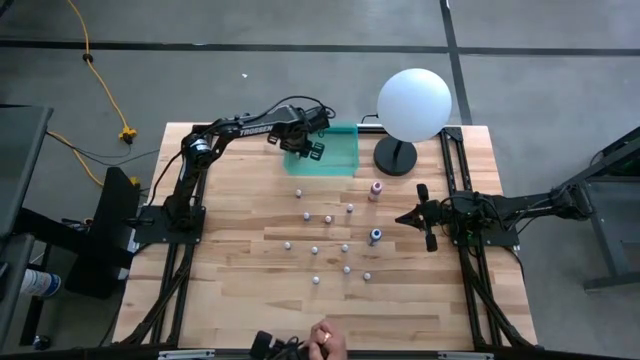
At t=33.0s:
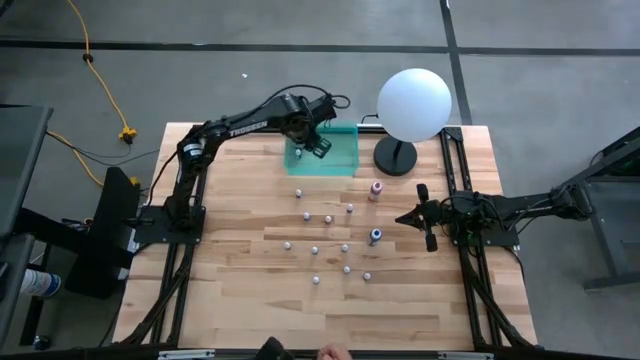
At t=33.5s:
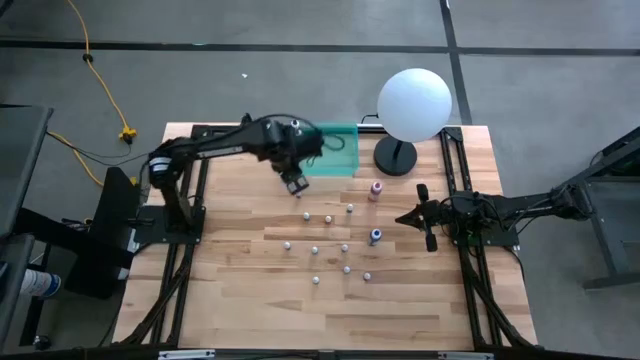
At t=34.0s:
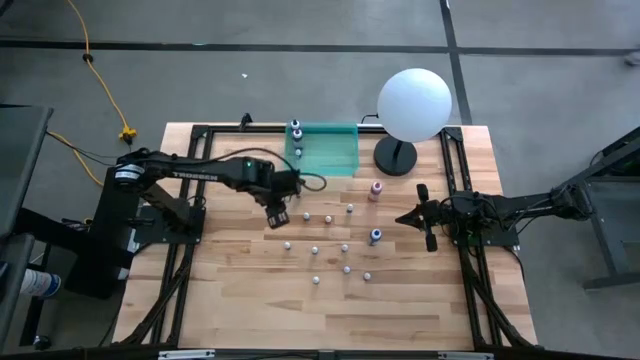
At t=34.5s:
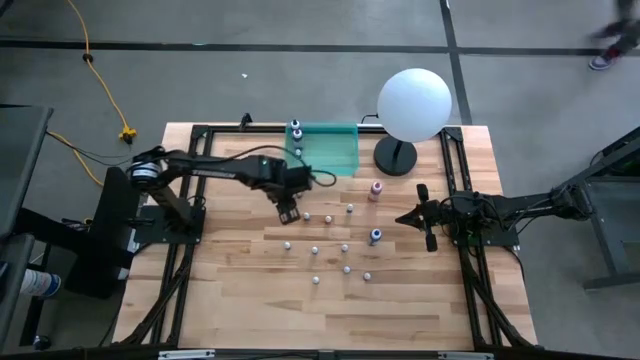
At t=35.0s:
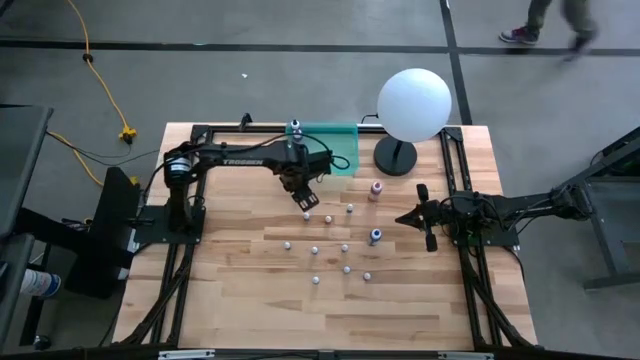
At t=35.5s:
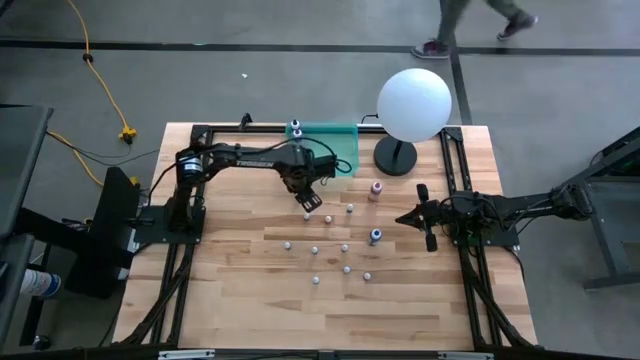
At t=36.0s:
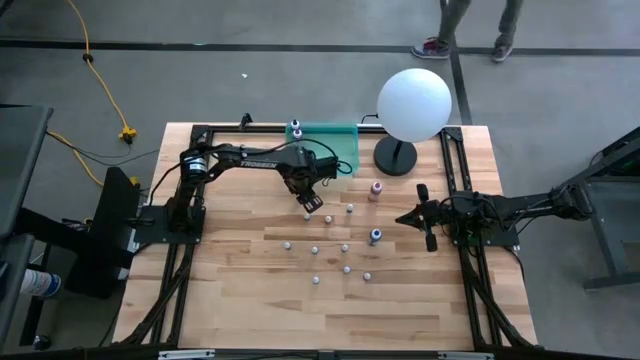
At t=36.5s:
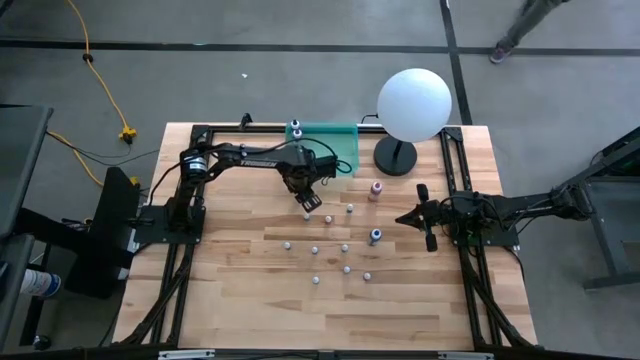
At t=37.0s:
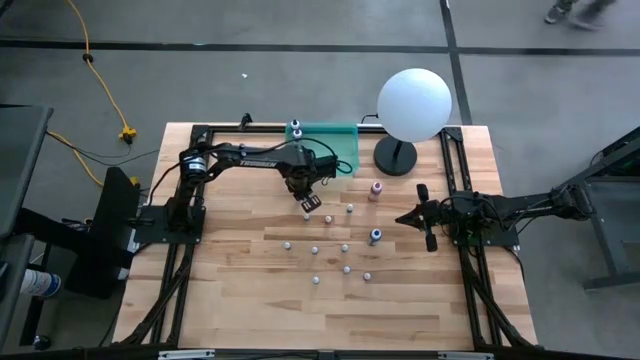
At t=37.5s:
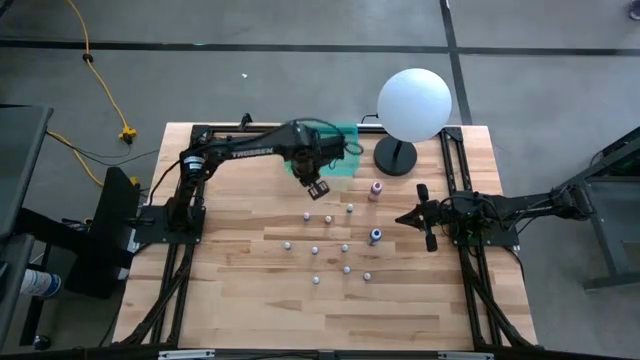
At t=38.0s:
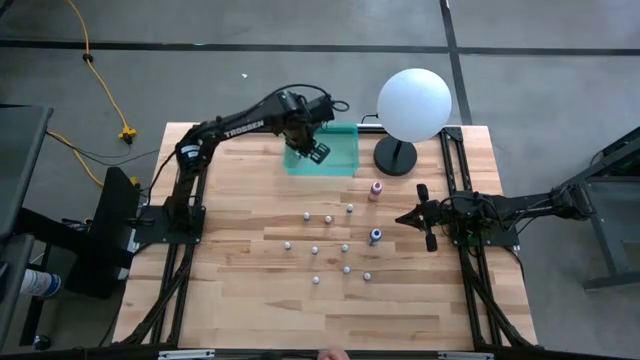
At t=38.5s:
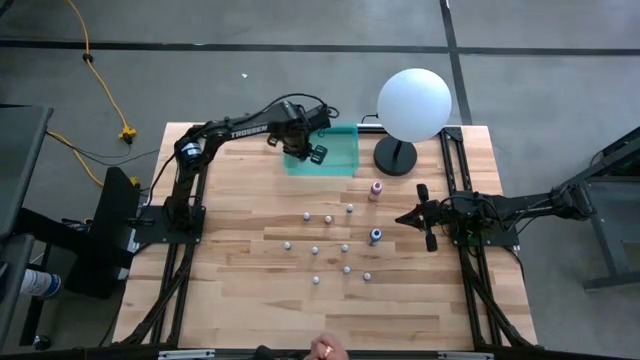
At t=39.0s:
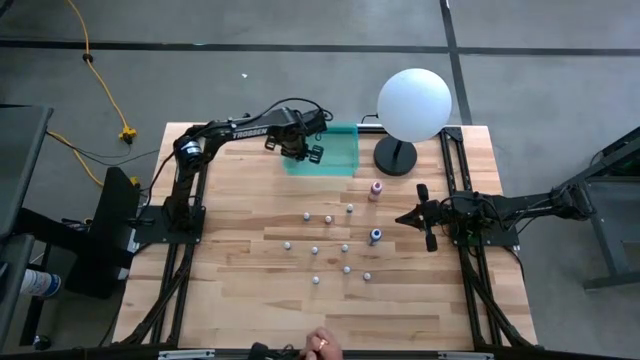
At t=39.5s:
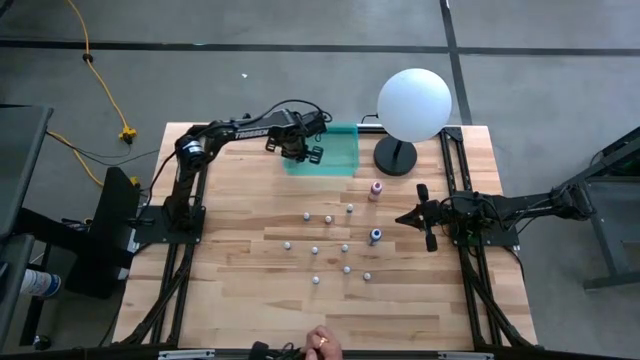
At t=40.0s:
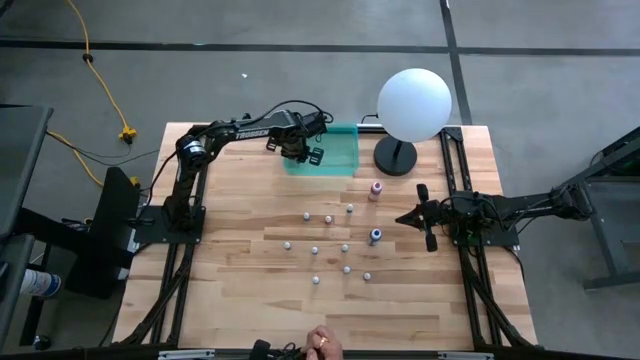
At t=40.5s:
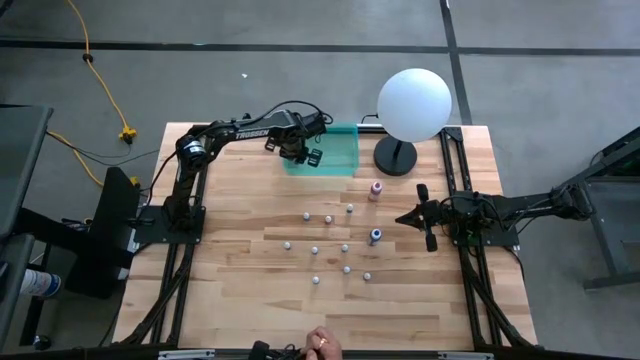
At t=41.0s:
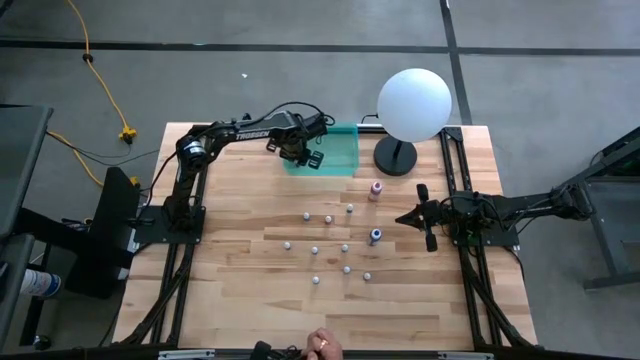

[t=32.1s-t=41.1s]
Task: Pick & Place food coloring
Put the small black food coloring bottle into the bin

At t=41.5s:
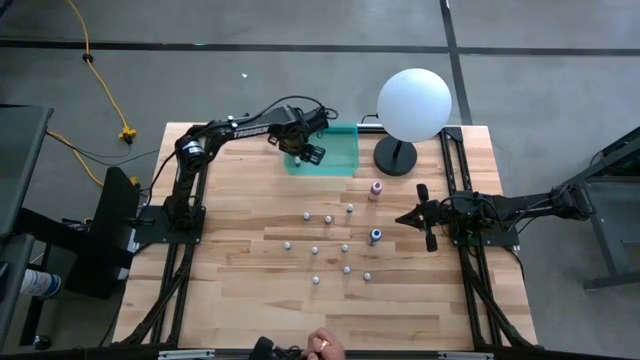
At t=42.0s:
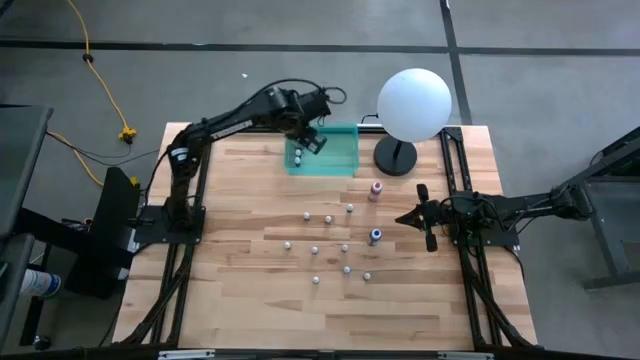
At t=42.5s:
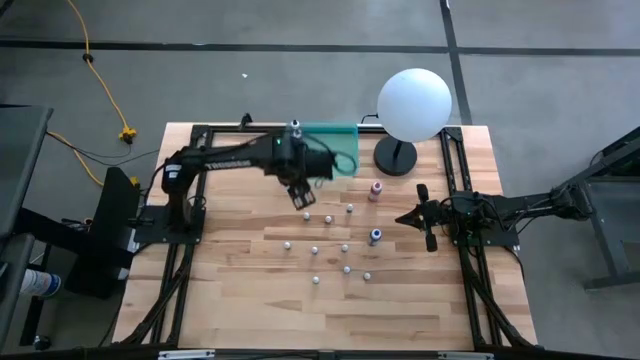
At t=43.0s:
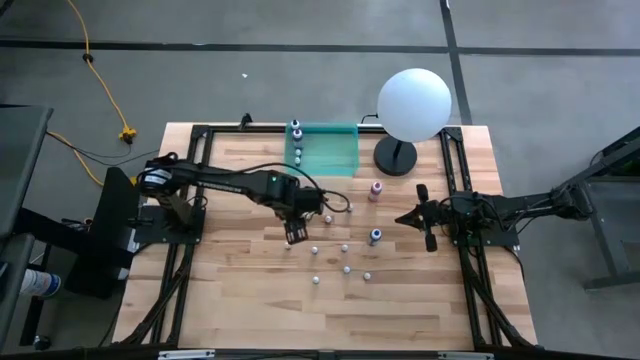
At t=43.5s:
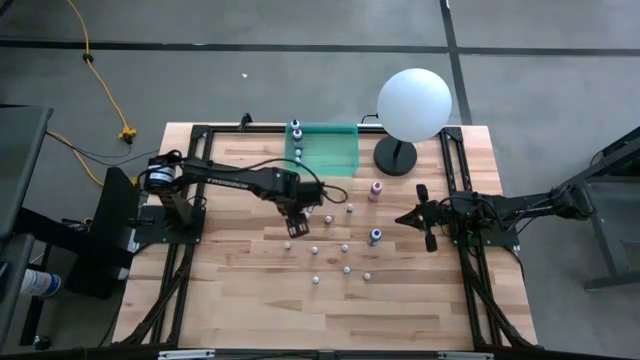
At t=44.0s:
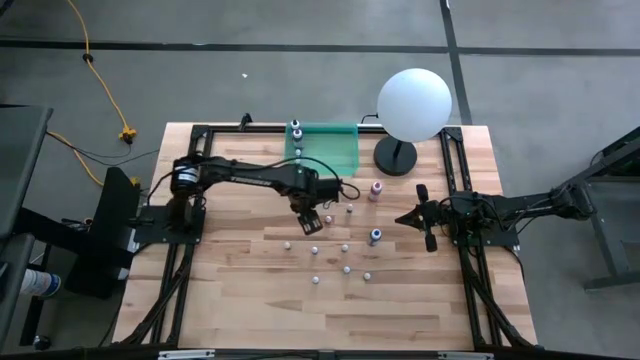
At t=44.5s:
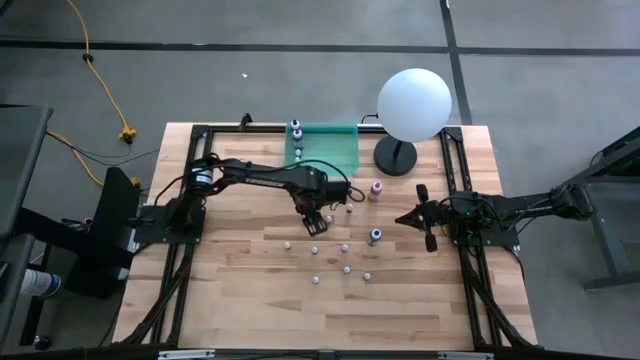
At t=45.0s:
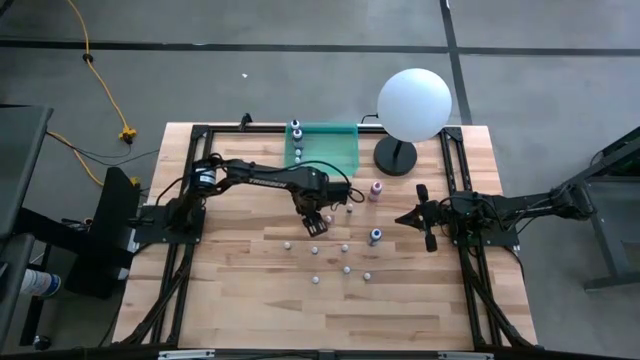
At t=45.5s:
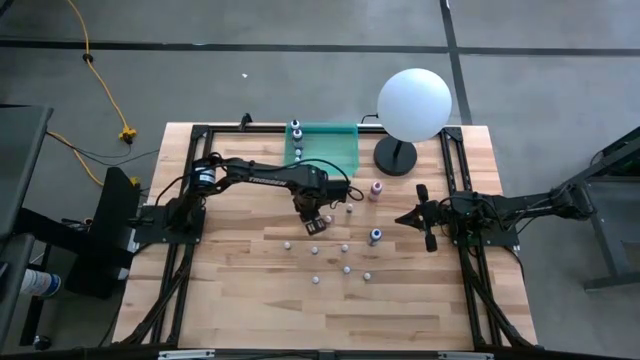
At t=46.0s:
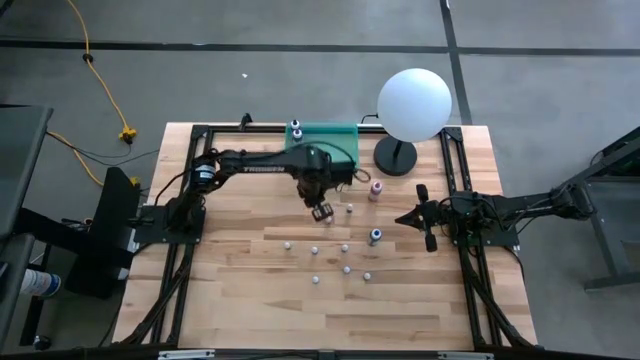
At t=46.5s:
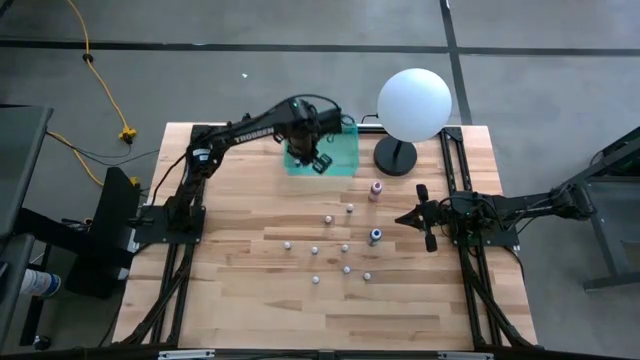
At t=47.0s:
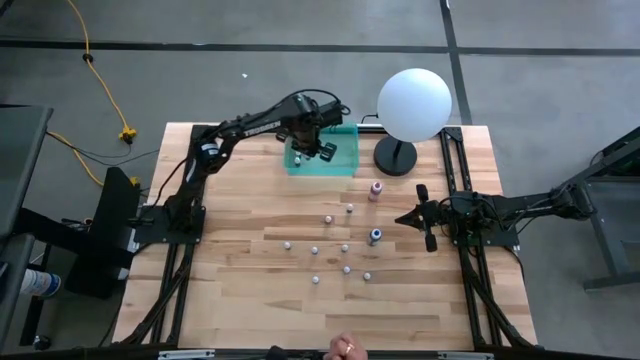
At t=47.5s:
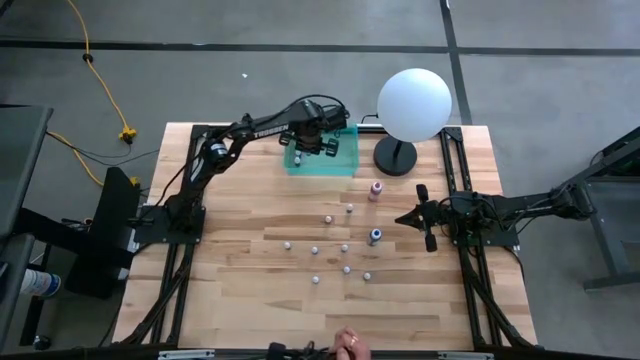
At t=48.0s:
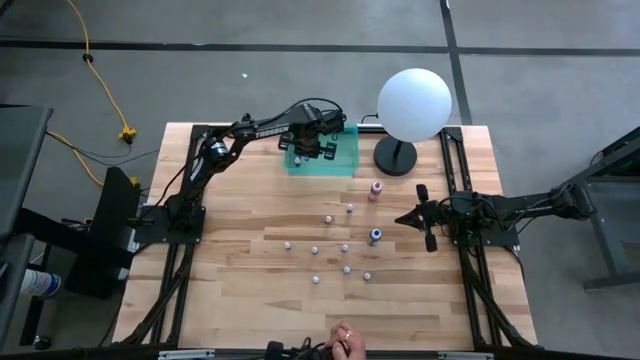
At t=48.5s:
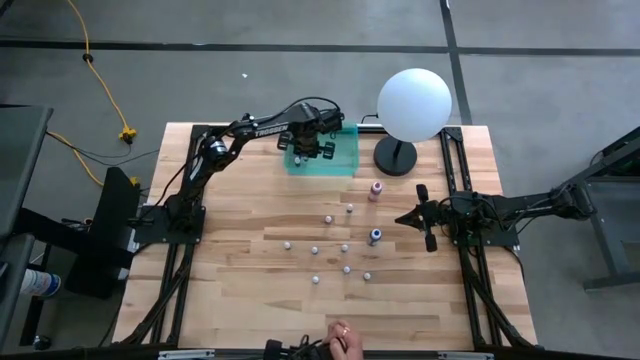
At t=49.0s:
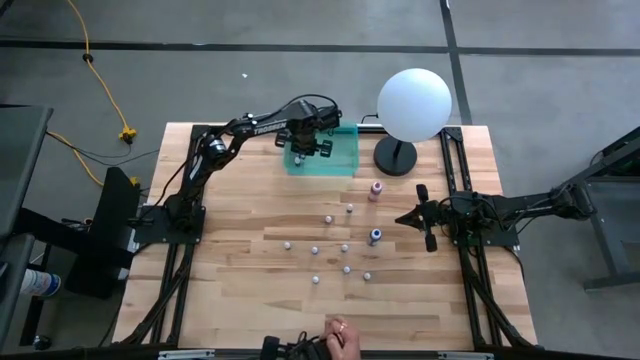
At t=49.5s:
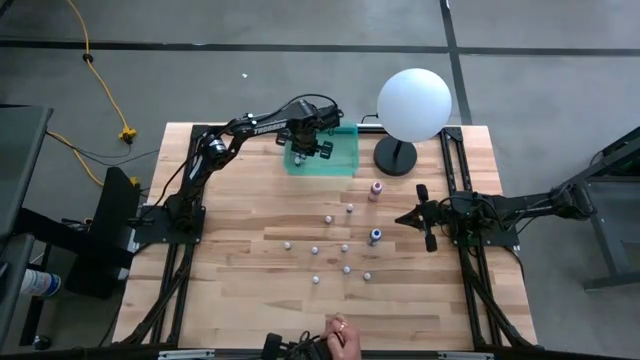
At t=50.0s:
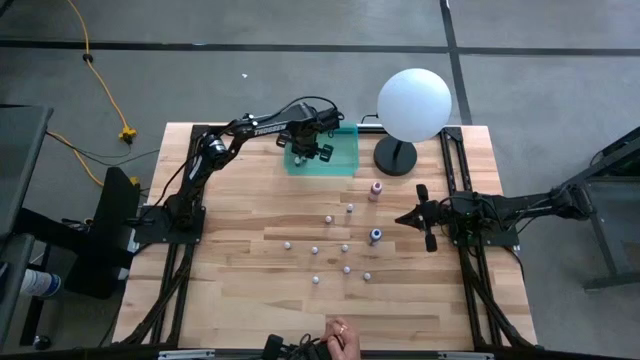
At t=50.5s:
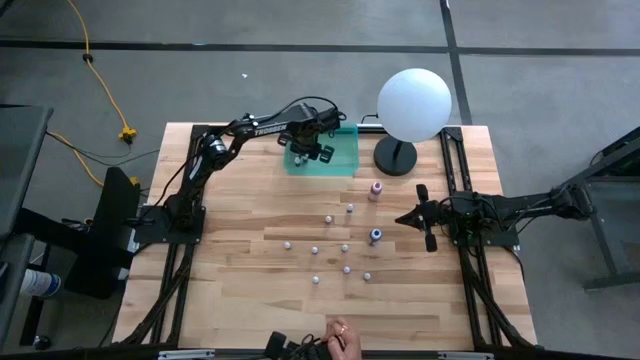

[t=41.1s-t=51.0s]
Put the small blue food coloring bottle into the bin

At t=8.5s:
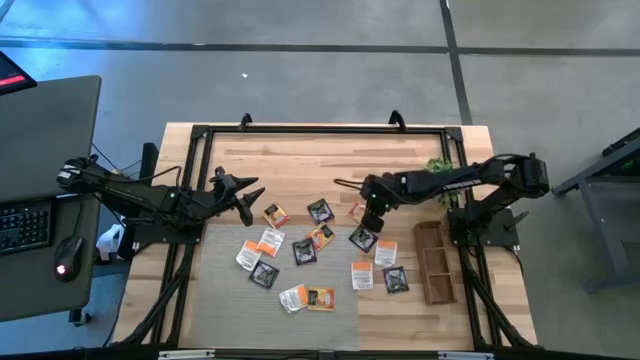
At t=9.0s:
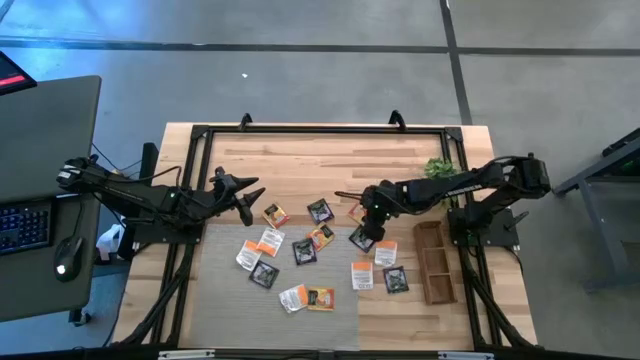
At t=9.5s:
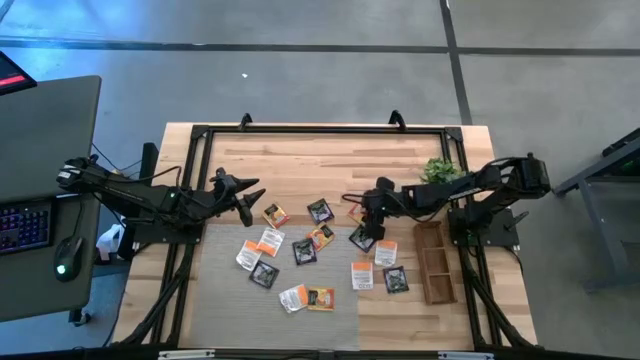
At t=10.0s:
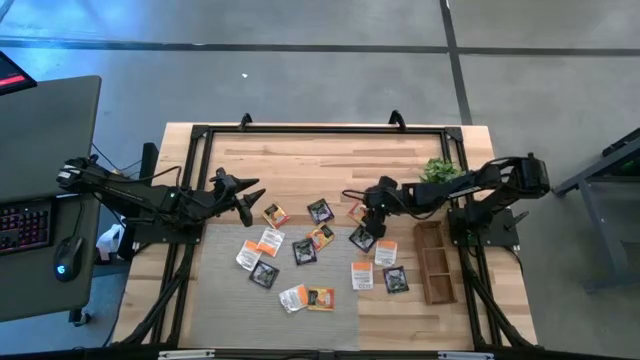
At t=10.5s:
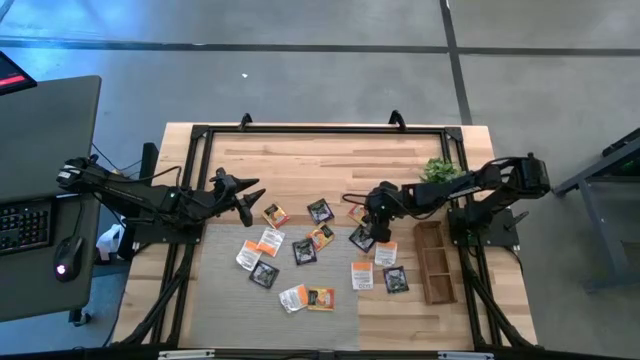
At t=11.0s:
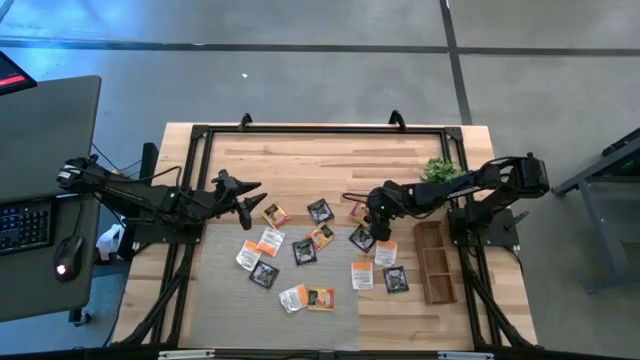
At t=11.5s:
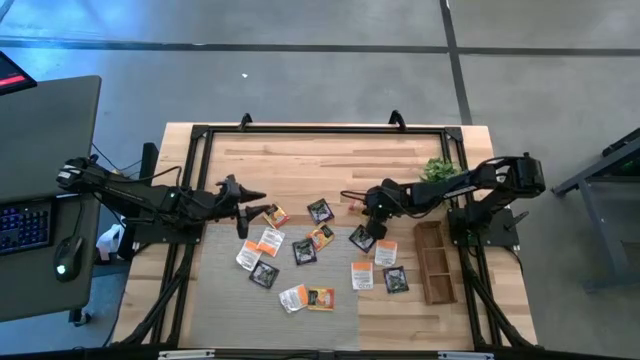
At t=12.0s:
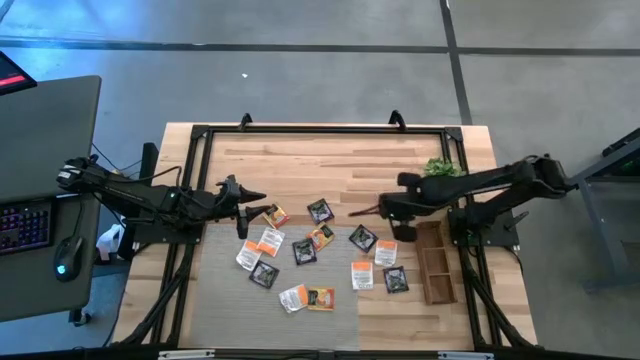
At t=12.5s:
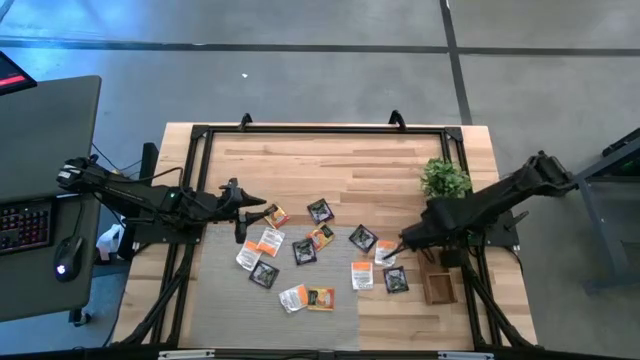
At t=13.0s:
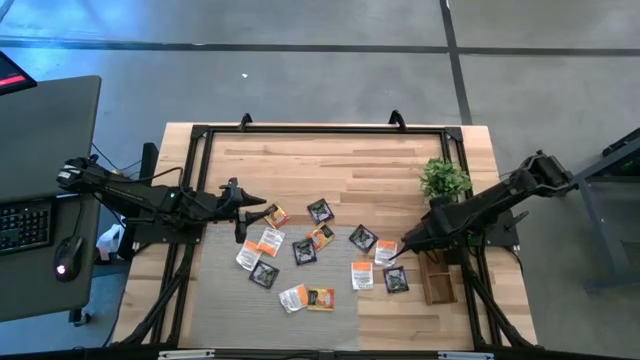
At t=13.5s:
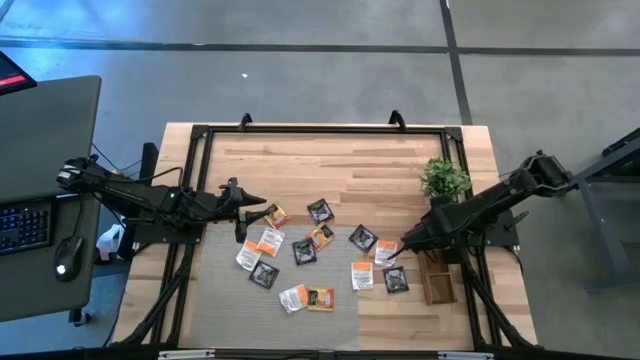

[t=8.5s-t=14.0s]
Task: Pick & Place Tea
Put the orange tea bag into the top section of the wooden organizer
